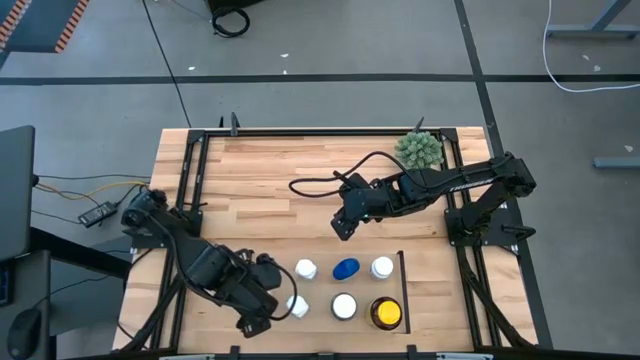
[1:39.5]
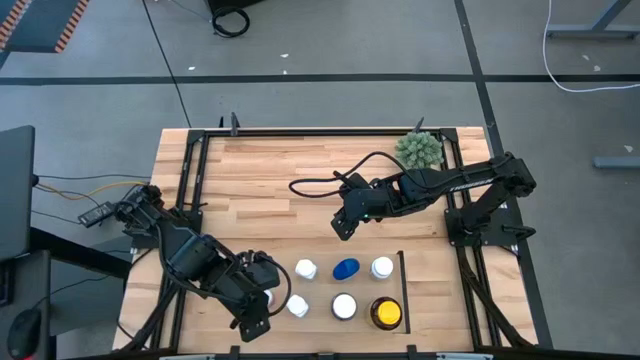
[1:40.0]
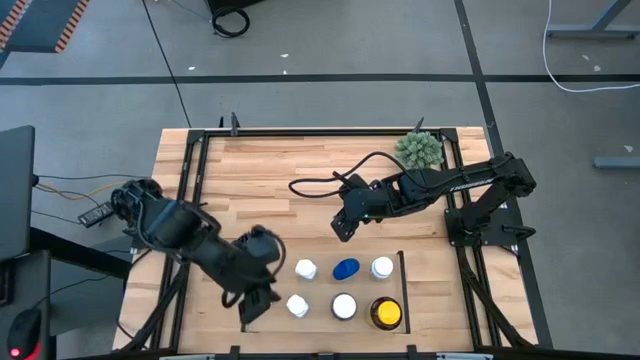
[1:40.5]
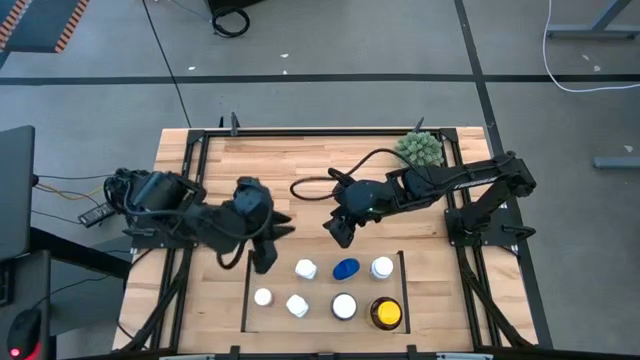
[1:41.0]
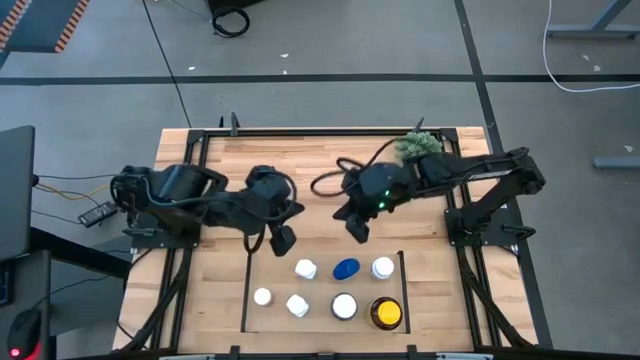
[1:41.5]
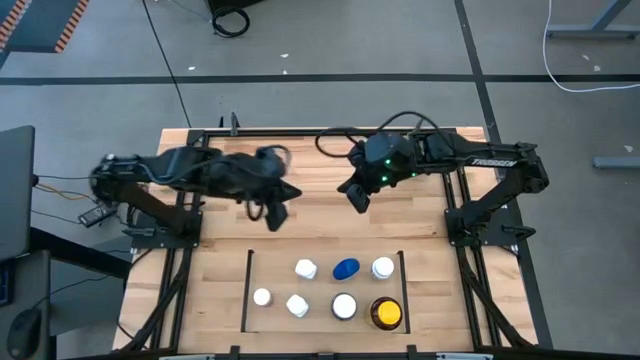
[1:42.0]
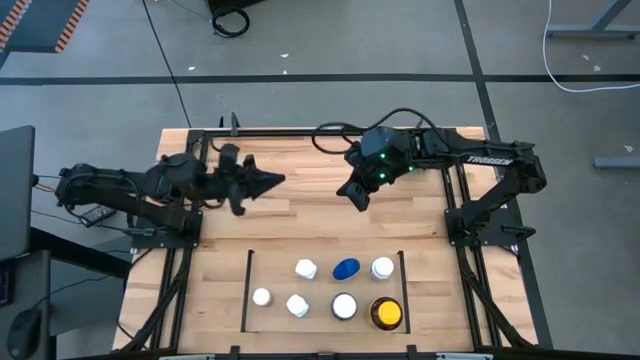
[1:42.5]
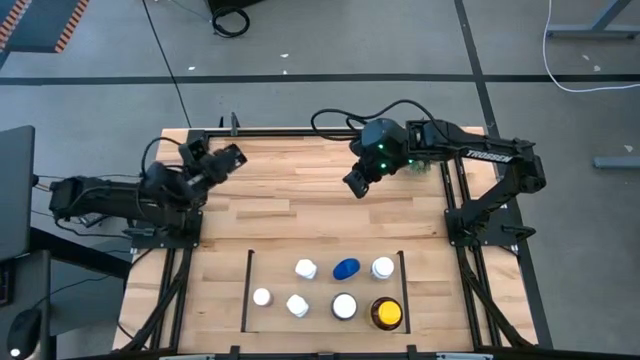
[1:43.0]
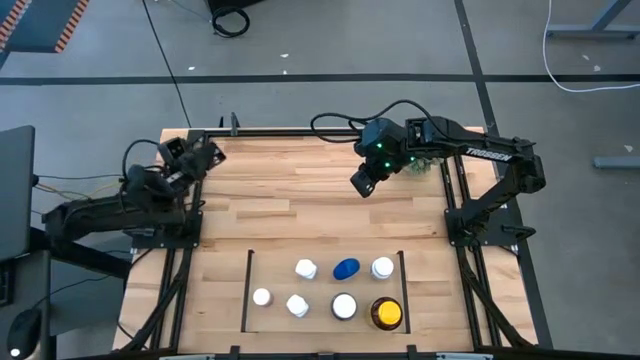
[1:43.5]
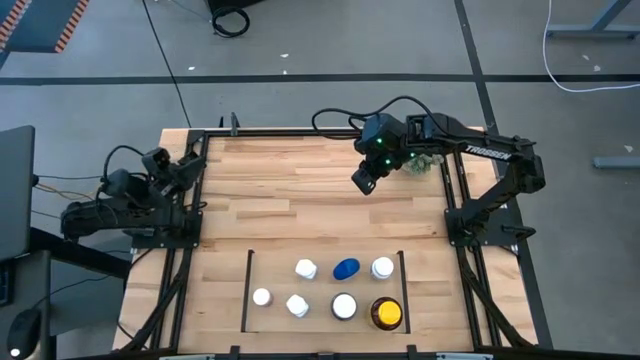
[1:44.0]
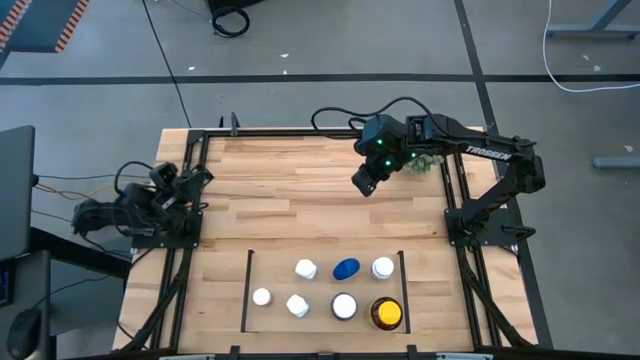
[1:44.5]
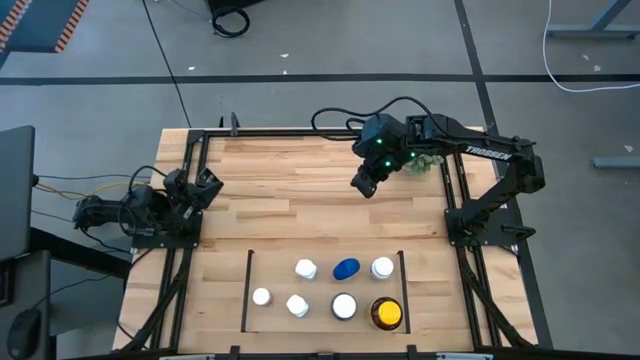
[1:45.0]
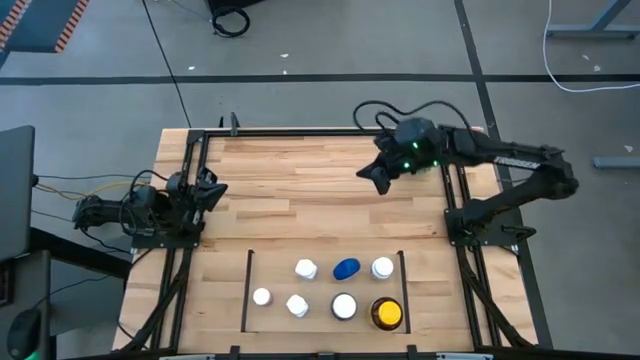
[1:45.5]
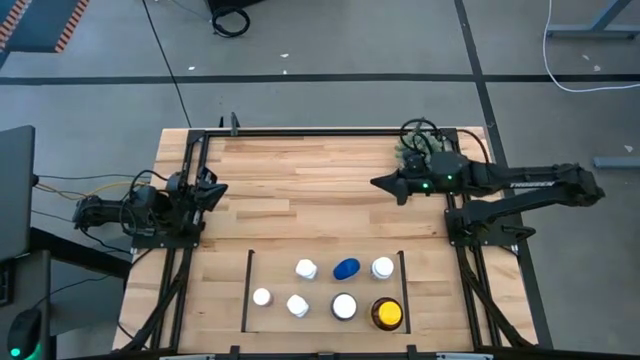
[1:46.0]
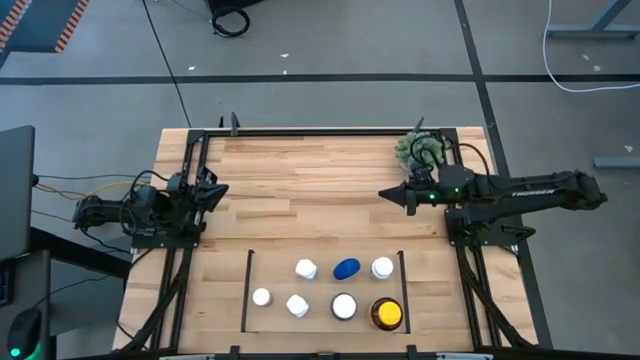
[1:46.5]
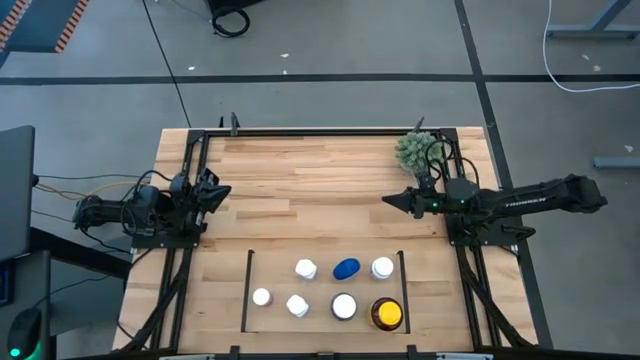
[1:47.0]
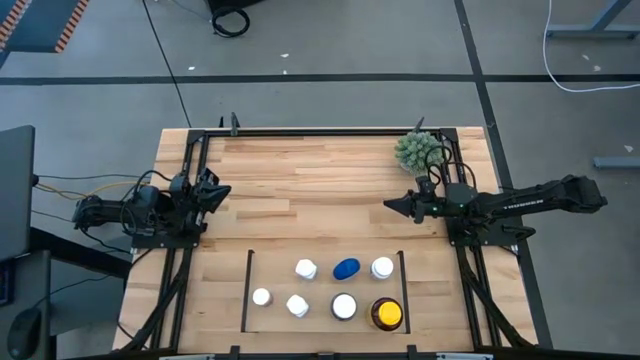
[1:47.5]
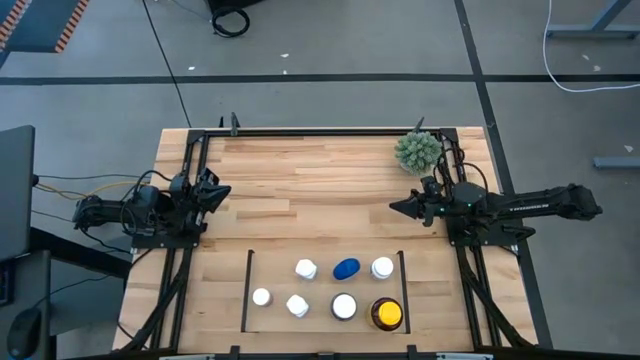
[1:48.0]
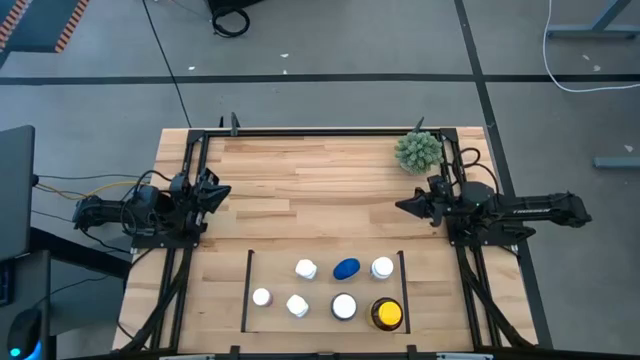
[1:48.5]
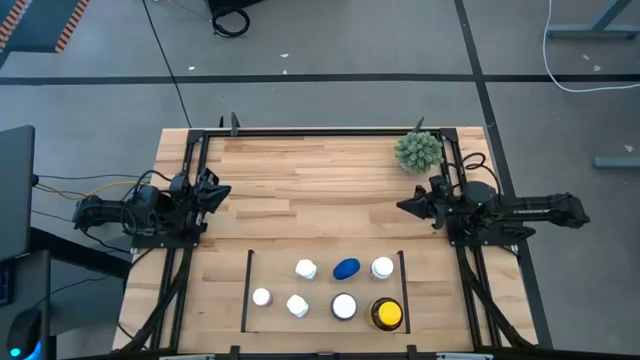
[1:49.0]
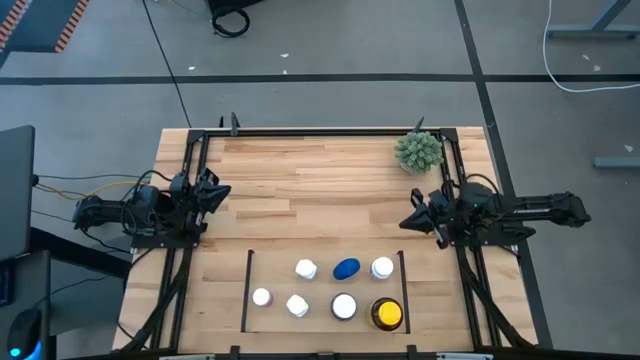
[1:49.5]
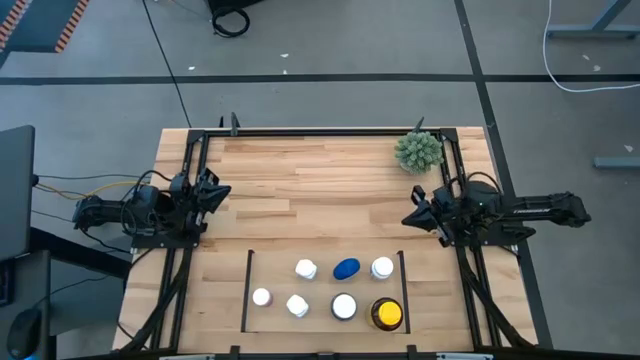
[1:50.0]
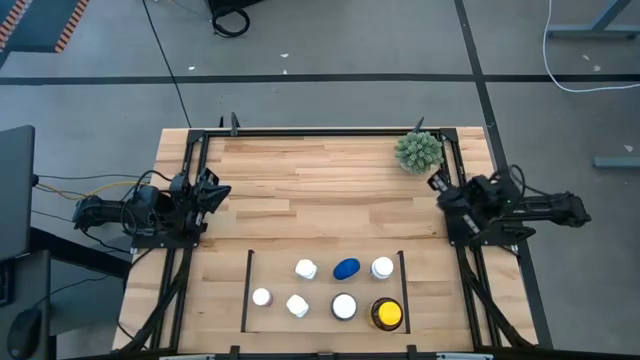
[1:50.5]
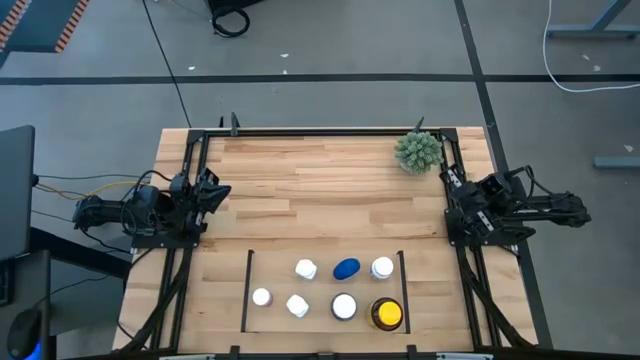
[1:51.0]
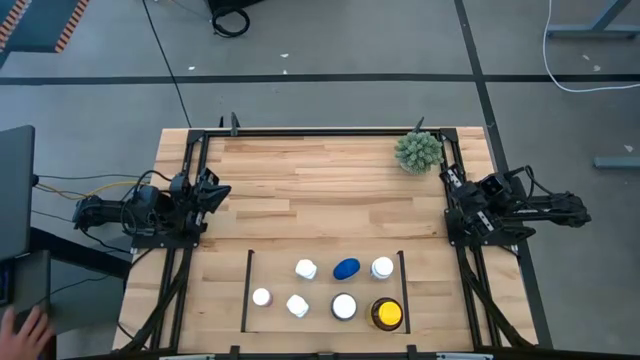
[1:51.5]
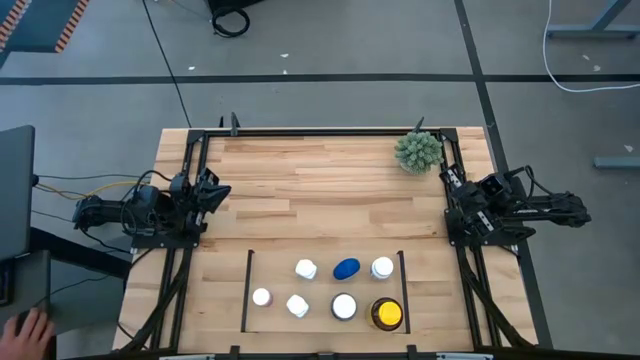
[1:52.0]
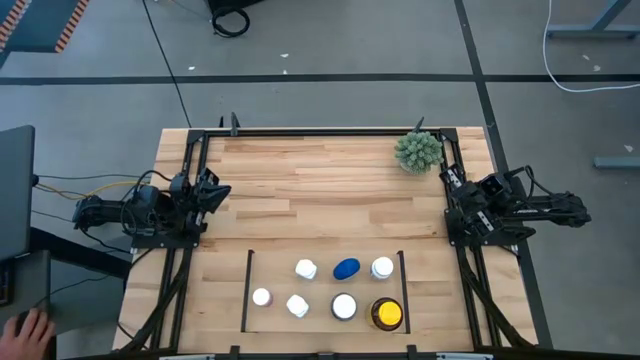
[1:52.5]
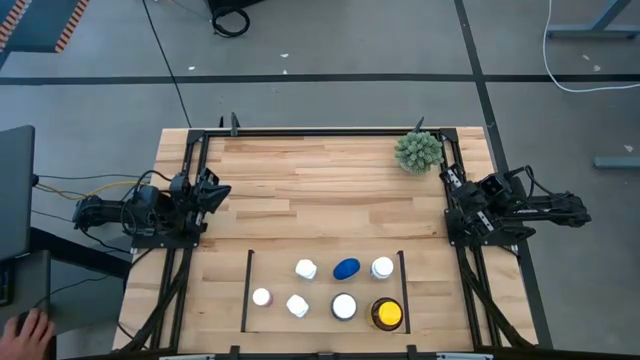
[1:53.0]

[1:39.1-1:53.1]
Task: Pick and place medicine bottles onto shelf by color
Return to Home Position

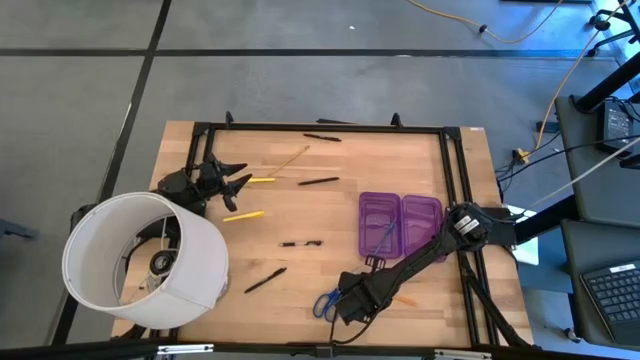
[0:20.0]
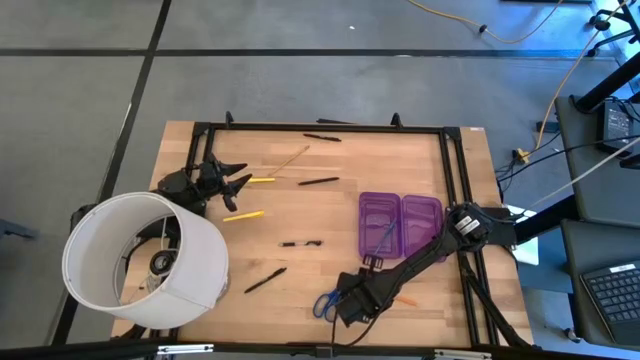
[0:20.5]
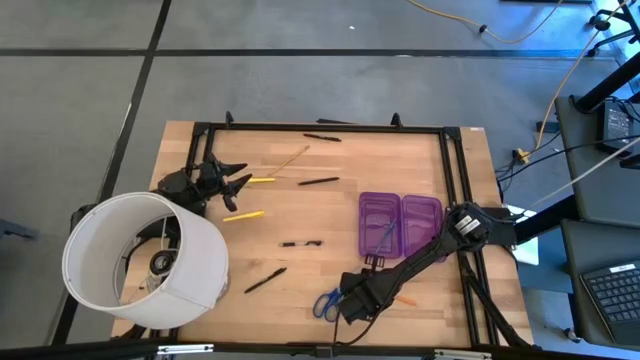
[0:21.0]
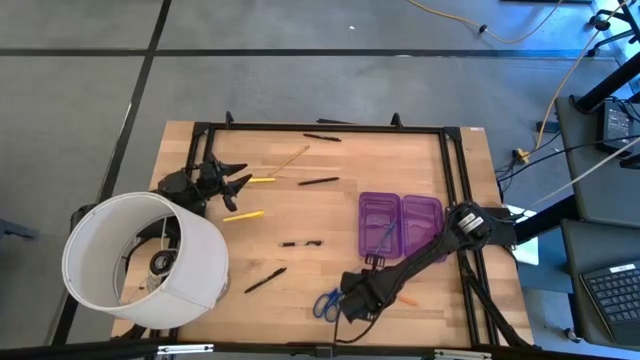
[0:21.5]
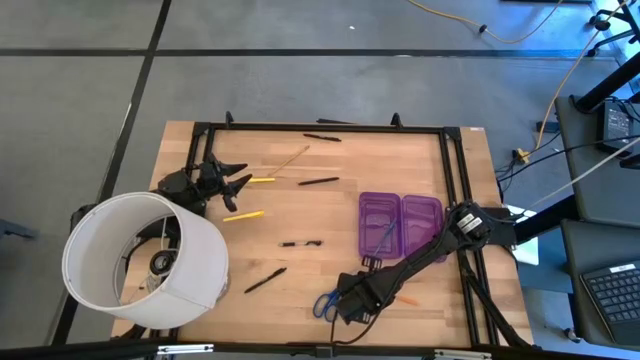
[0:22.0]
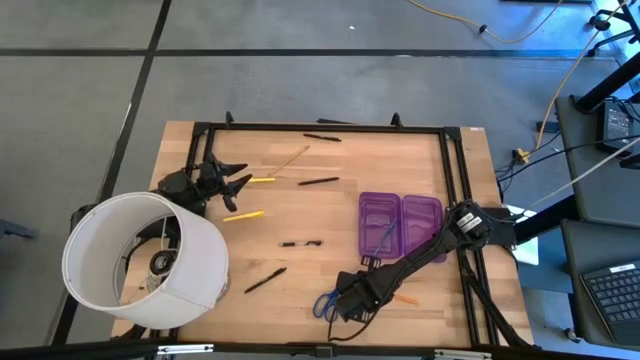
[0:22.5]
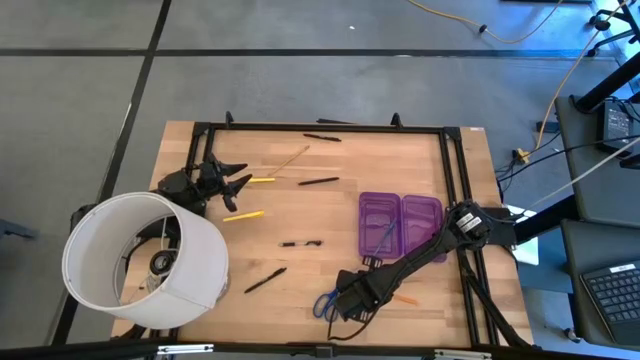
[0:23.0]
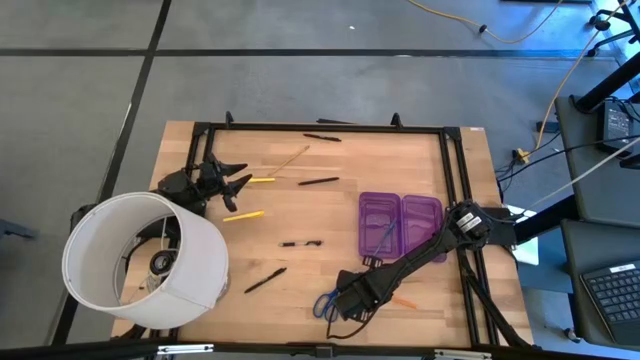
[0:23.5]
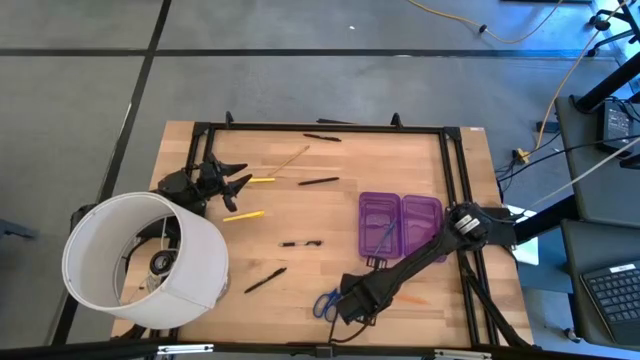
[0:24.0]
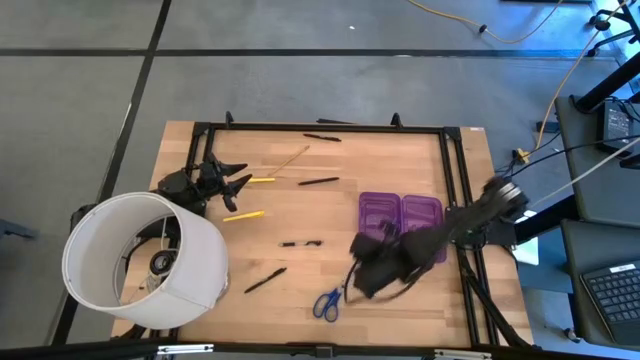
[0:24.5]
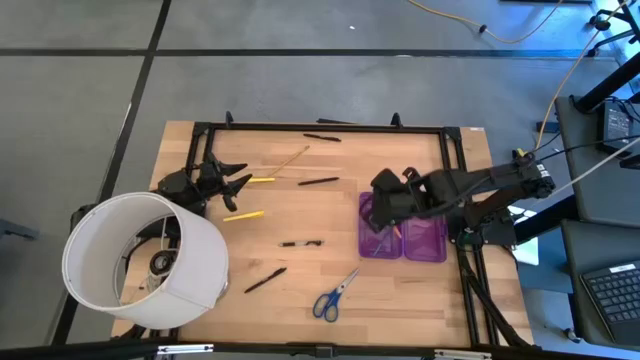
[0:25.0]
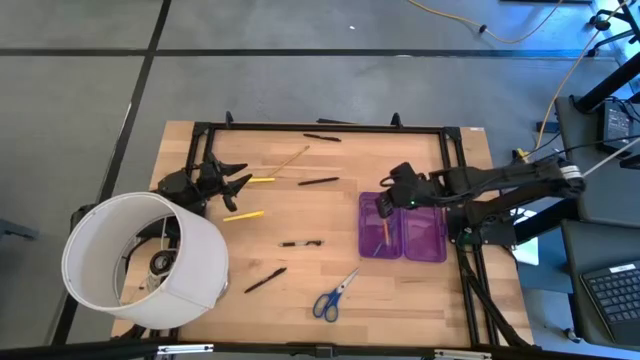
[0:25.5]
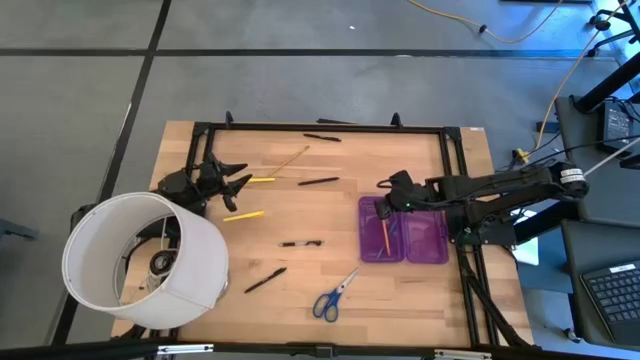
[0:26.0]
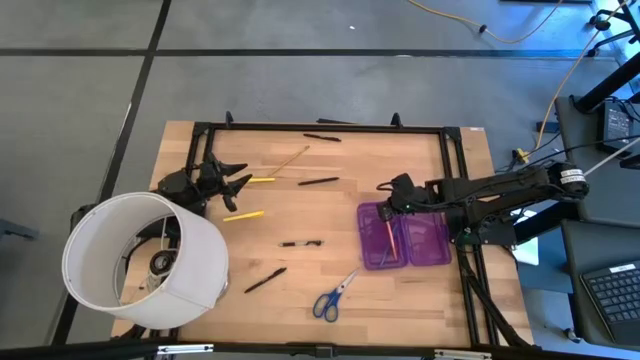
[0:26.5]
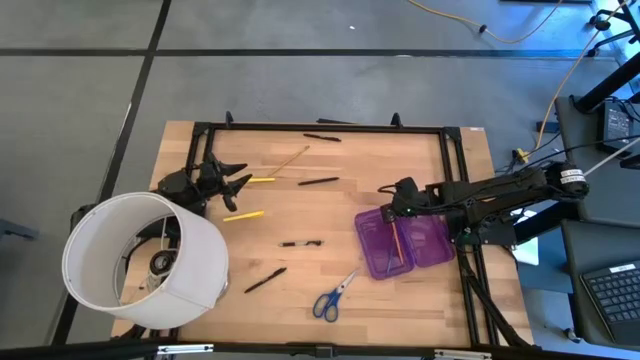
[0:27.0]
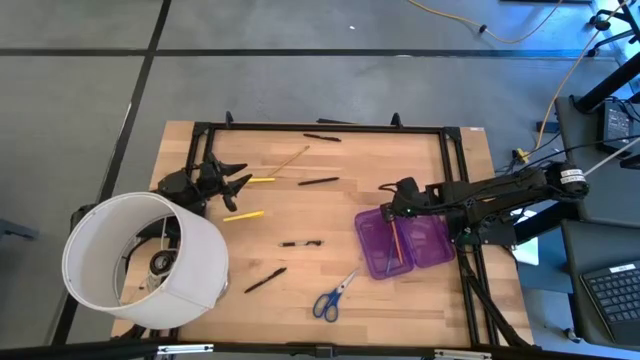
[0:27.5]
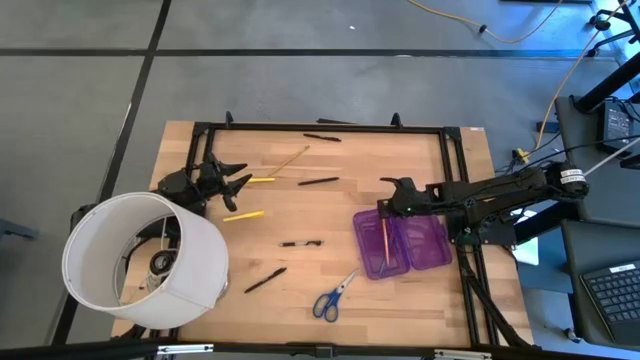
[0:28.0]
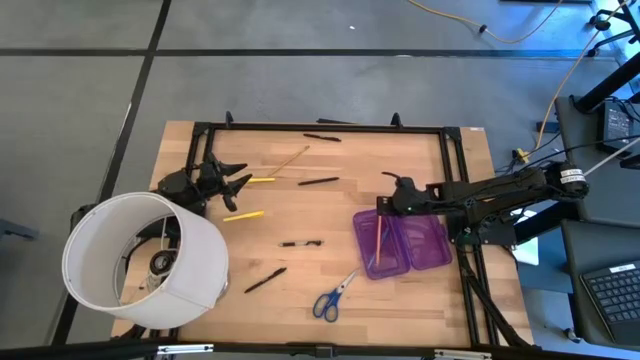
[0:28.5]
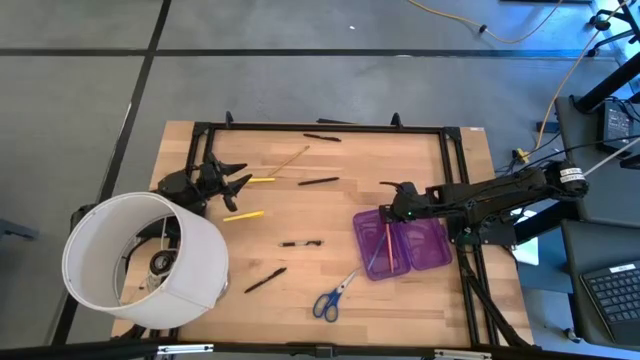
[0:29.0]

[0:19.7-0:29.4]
Task: Pick & place school supplies into a supply box
Put the bottom pencil into the supply box
